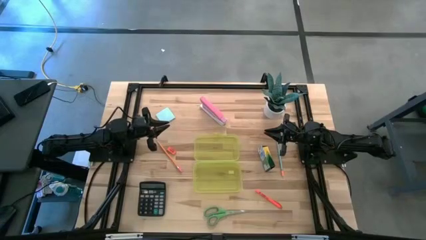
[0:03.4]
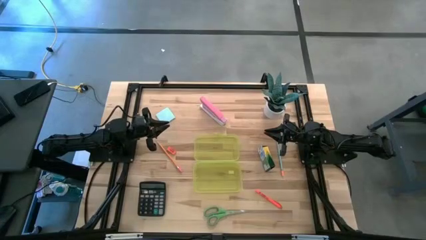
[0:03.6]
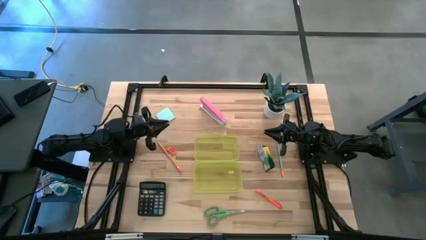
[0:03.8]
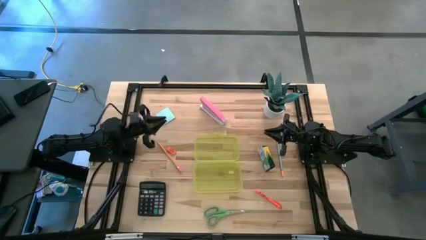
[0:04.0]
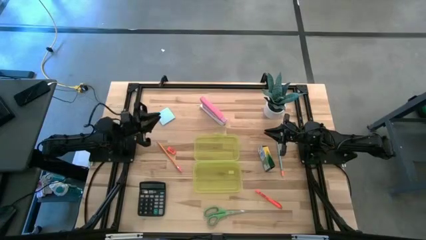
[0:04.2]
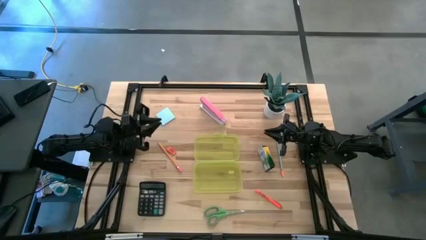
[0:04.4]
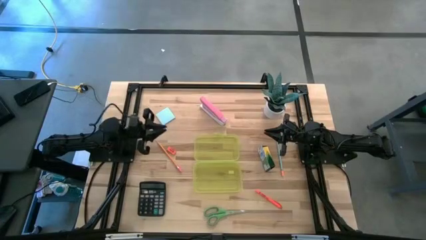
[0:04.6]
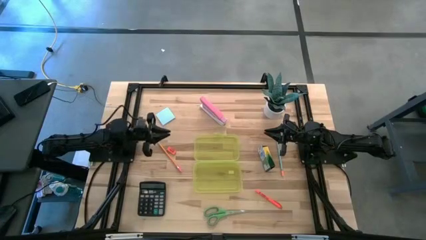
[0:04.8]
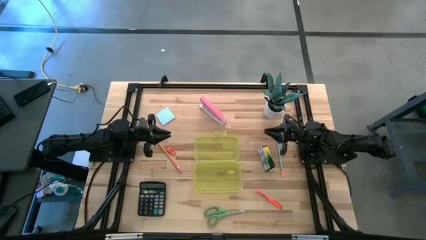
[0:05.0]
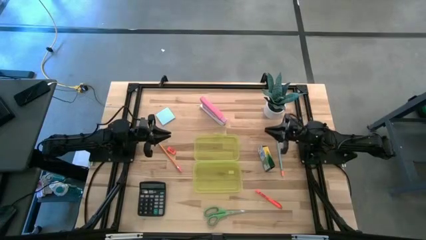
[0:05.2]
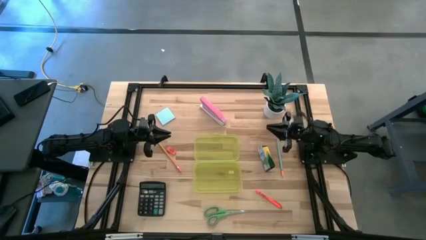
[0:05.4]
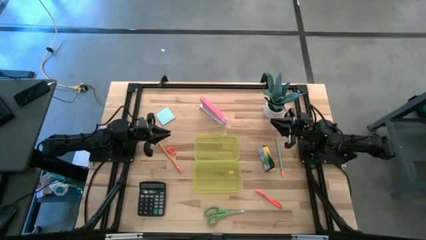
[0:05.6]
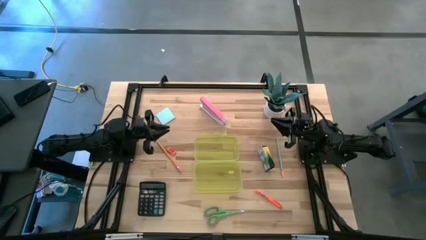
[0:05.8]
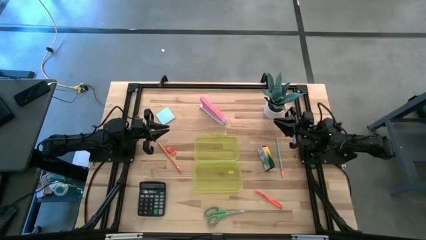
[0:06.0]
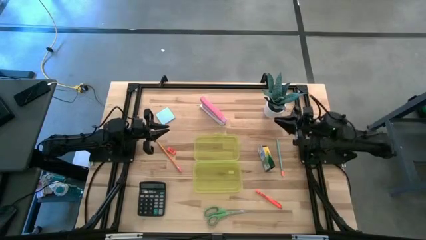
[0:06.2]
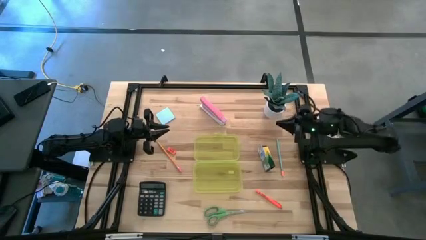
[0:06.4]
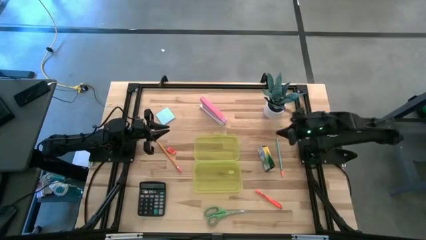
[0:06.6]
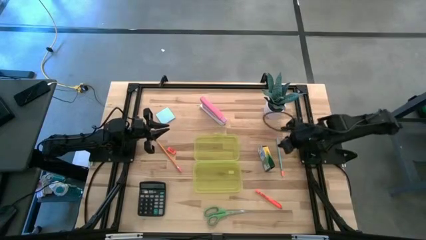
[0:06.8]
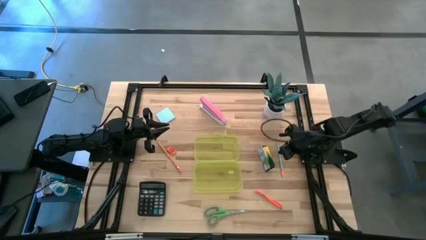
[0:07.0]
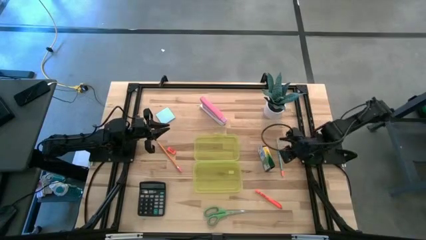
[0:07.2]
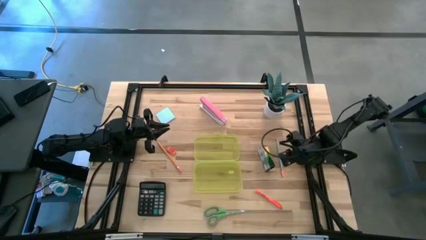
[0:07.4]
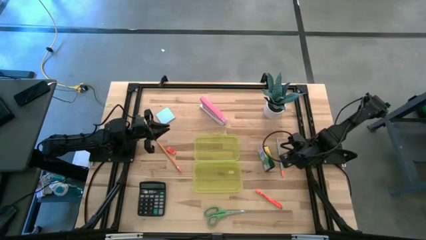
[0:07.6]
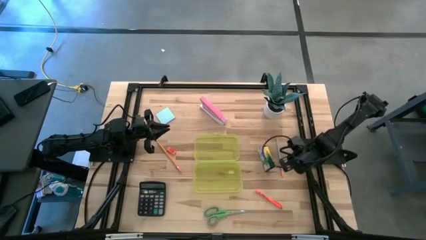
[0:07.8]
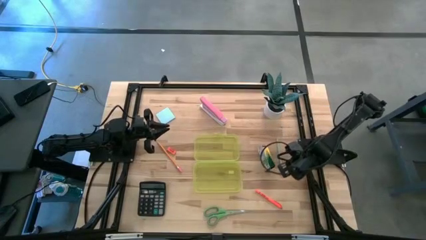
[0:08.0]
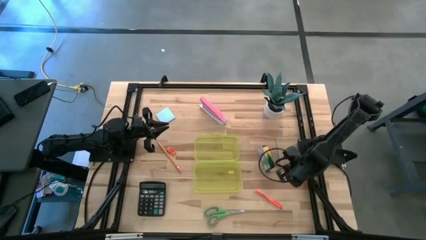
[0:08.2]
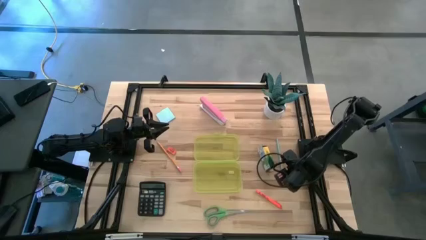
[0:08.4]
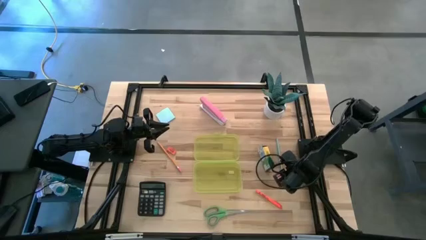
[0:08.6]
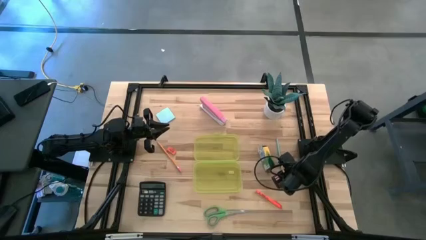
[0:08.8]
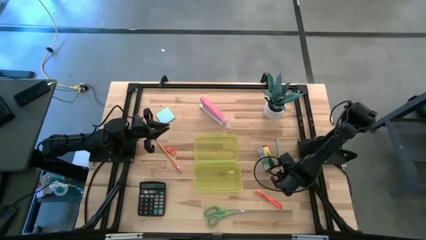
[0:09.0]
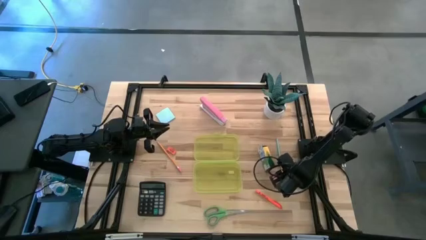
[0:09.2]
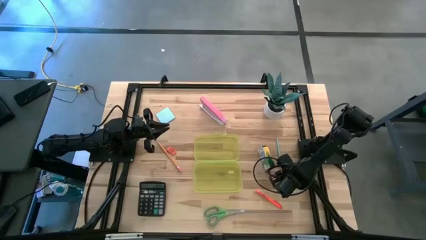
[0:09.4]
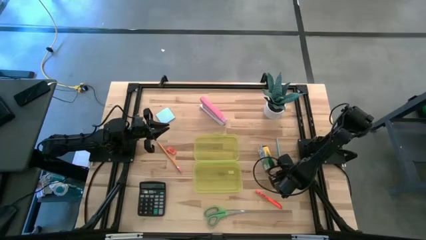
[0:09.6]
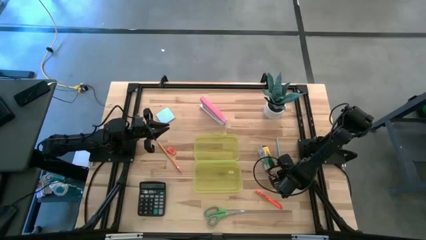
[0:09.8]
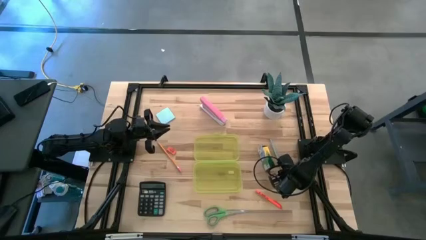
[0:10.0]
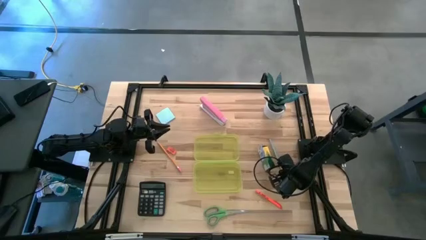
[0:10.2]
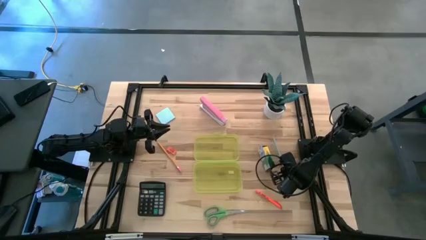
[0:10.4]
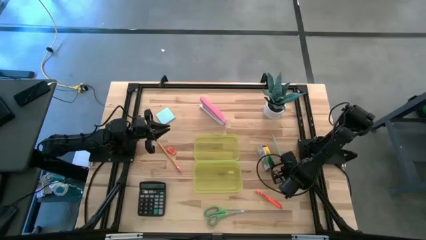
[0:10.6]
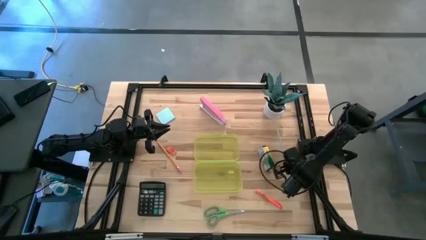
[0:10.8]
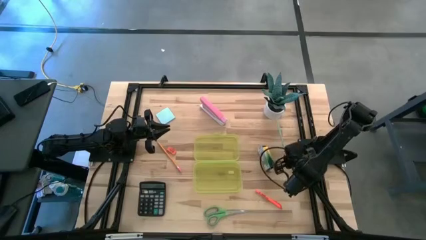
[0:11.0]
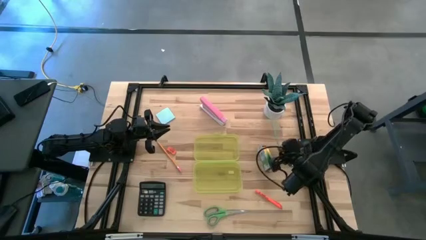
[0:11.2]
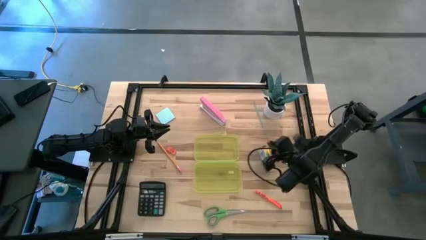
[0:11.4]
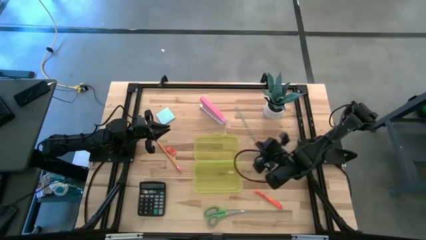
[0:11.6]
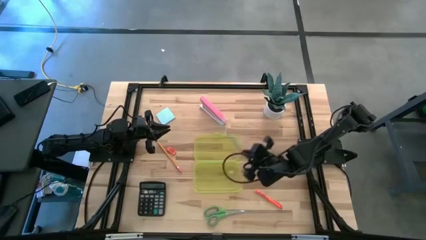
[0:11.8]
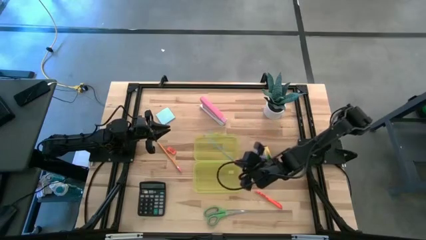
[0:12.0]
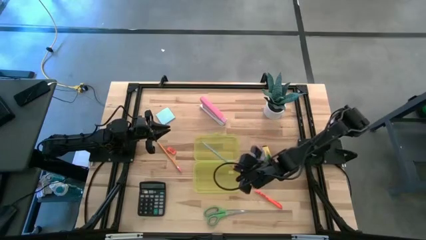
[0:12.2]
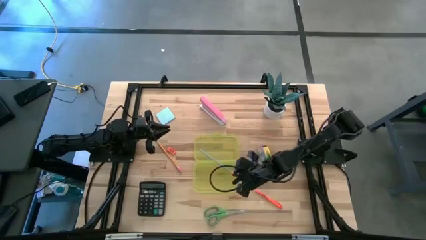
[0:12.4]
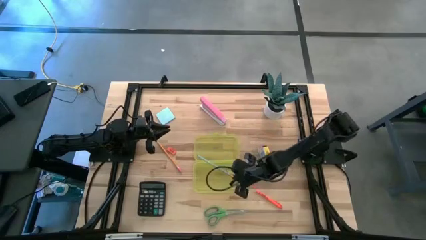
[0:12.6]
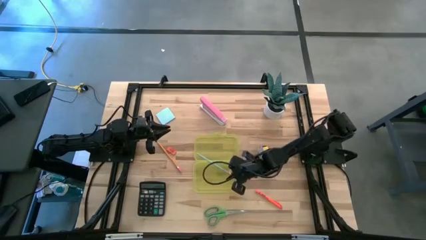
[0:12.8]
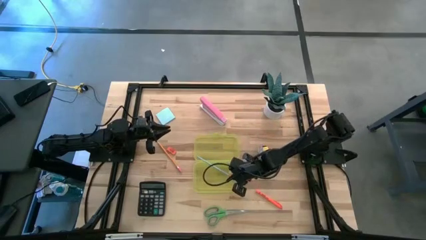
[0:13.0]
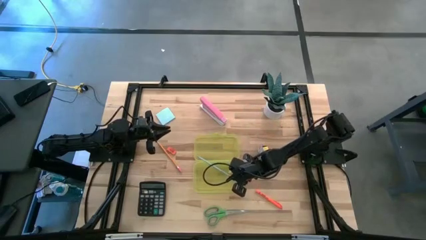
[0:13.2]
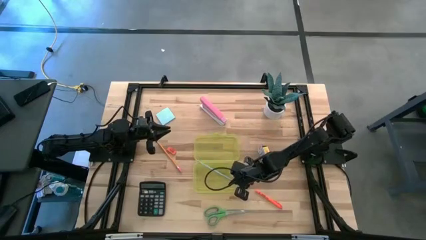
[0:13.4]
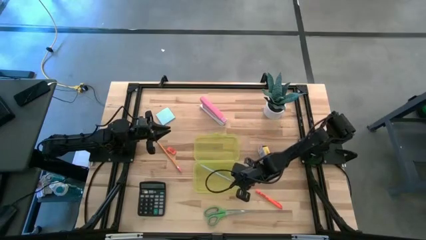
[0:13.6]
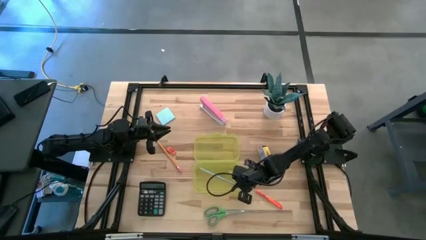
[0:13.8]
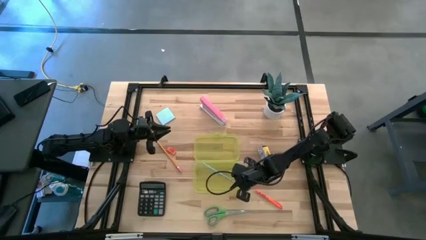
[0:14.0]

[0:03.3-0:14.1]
Task: Pack school essentials
Put the blue pencil into the yellow supply box
